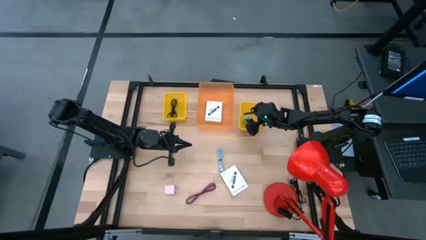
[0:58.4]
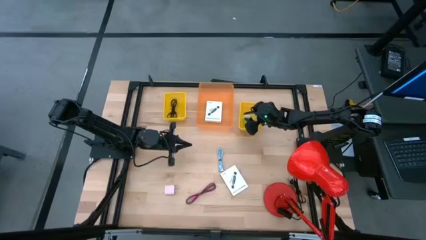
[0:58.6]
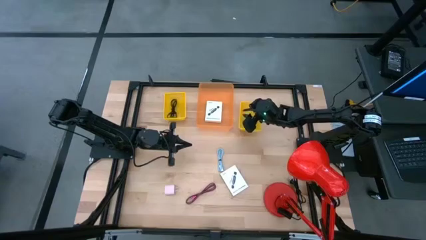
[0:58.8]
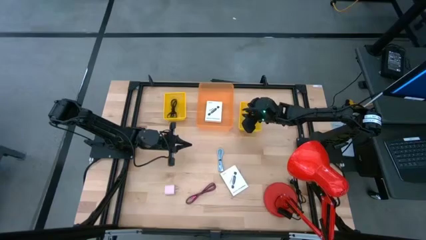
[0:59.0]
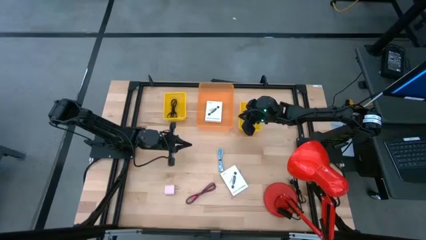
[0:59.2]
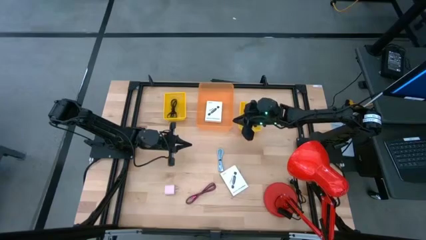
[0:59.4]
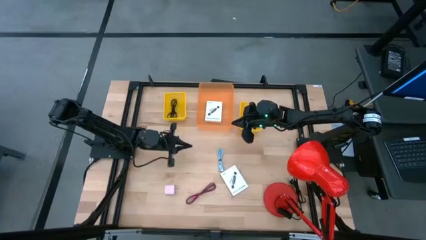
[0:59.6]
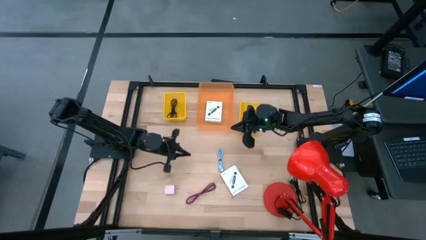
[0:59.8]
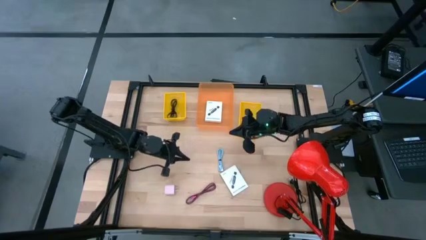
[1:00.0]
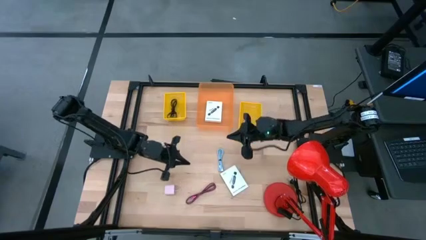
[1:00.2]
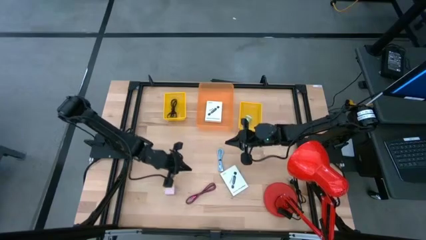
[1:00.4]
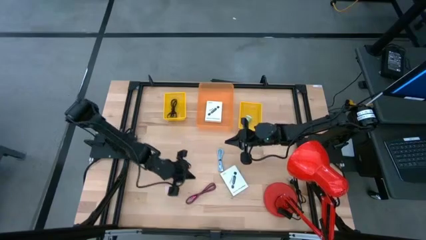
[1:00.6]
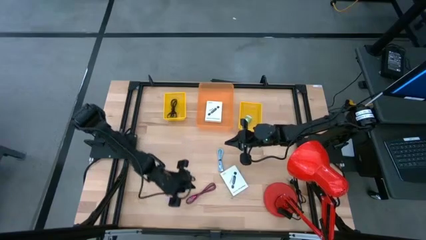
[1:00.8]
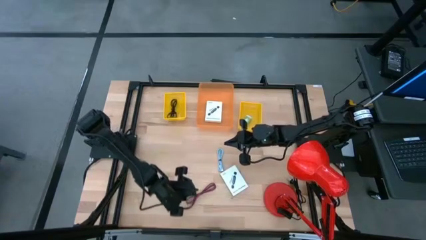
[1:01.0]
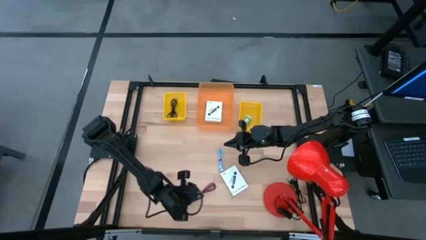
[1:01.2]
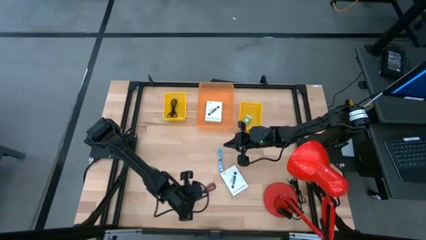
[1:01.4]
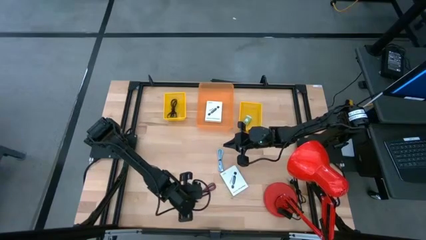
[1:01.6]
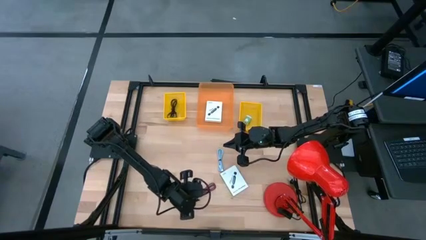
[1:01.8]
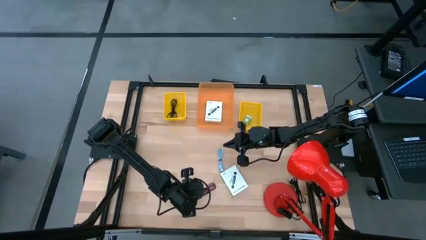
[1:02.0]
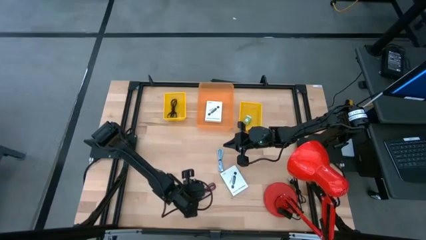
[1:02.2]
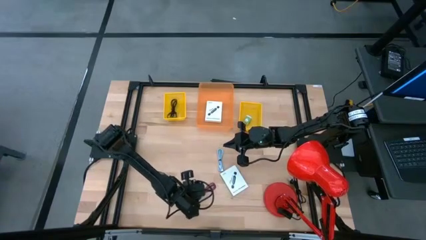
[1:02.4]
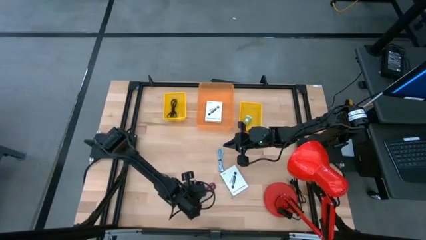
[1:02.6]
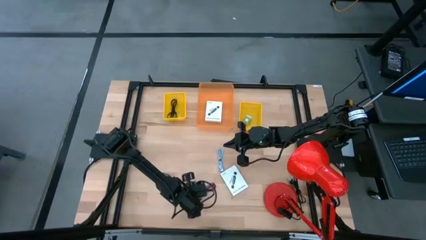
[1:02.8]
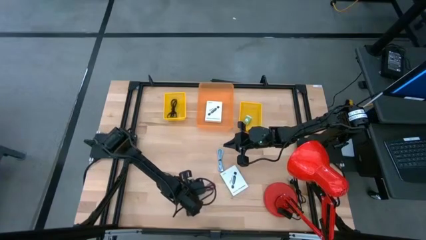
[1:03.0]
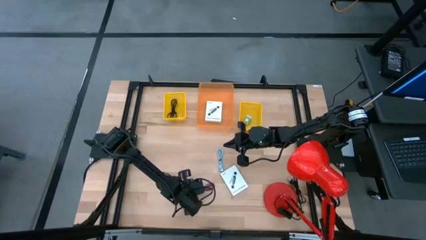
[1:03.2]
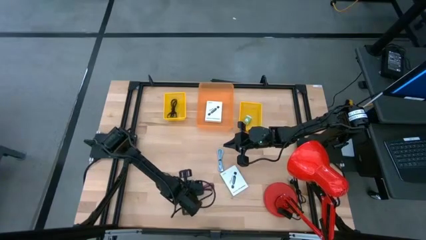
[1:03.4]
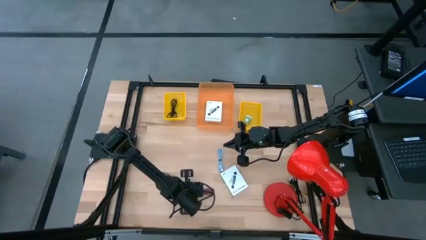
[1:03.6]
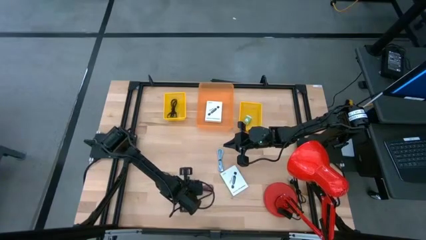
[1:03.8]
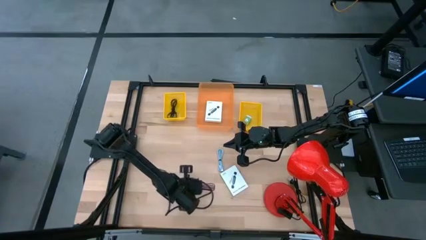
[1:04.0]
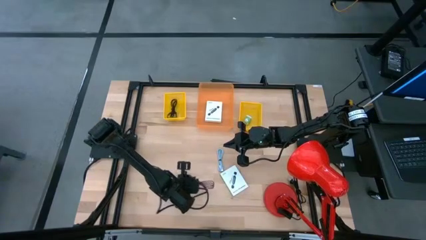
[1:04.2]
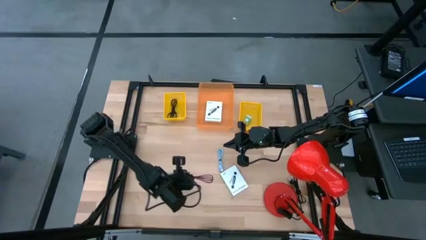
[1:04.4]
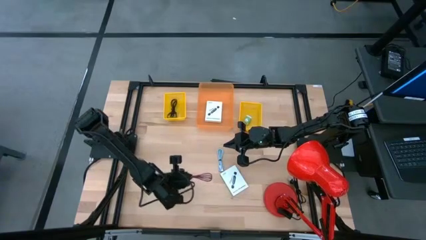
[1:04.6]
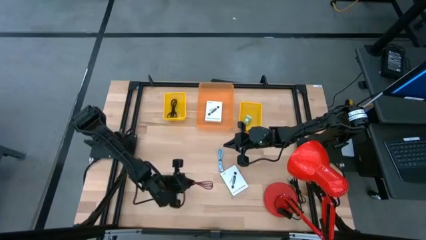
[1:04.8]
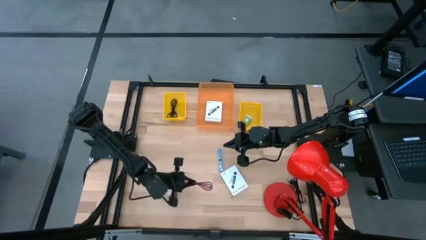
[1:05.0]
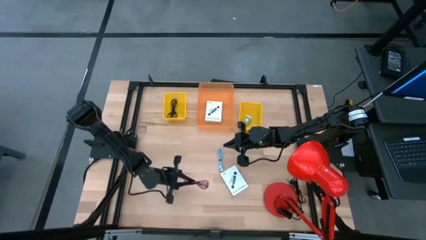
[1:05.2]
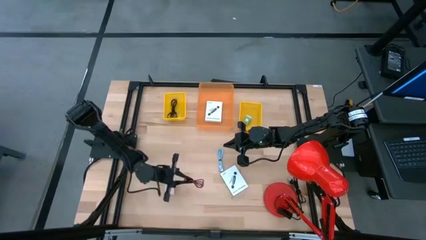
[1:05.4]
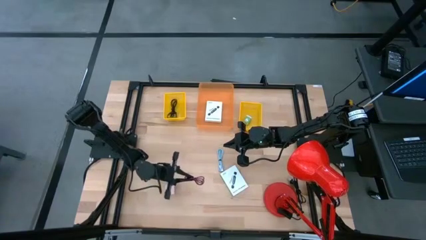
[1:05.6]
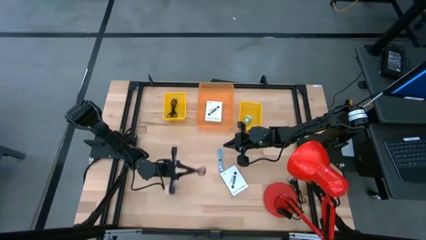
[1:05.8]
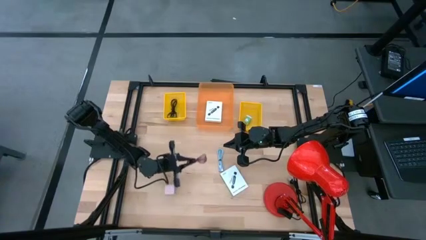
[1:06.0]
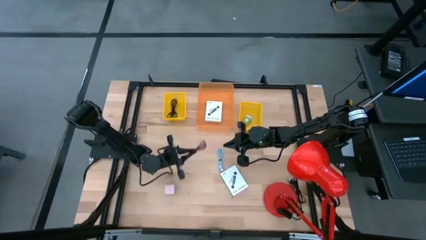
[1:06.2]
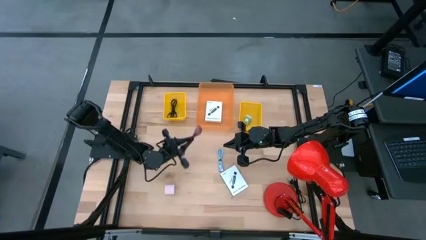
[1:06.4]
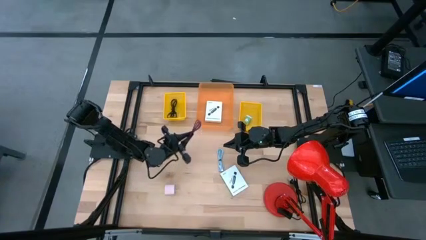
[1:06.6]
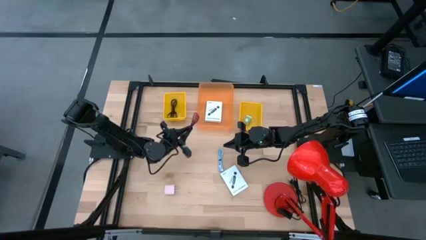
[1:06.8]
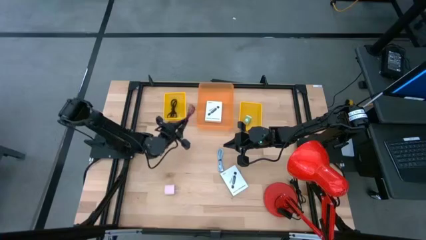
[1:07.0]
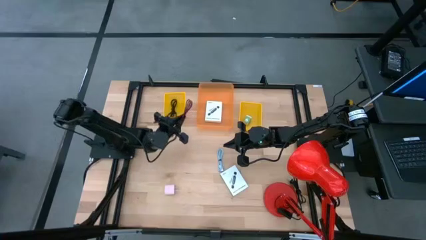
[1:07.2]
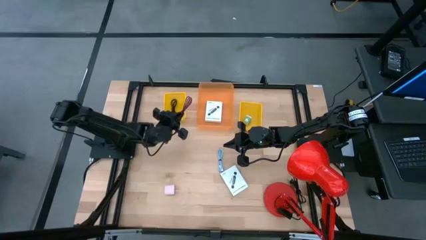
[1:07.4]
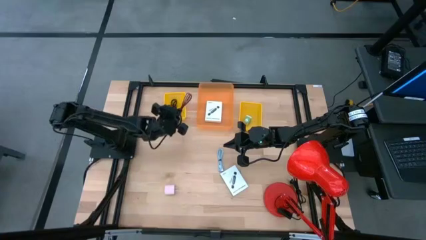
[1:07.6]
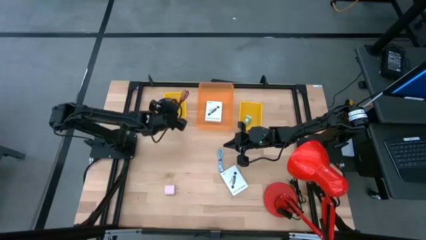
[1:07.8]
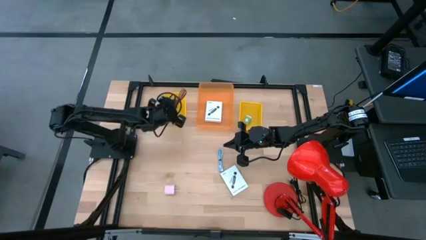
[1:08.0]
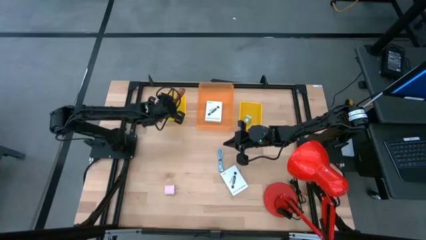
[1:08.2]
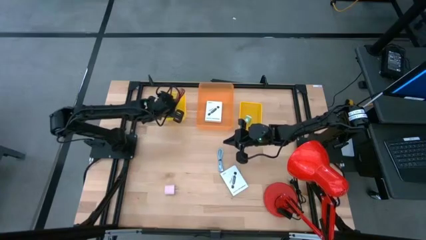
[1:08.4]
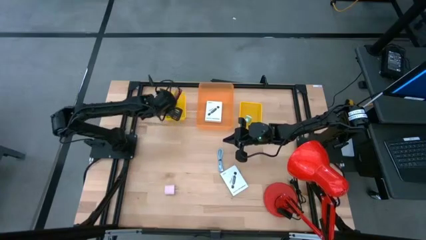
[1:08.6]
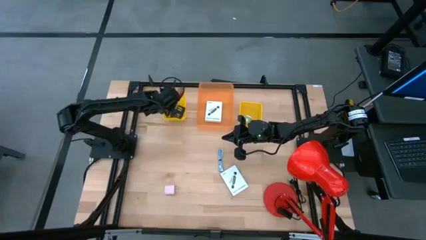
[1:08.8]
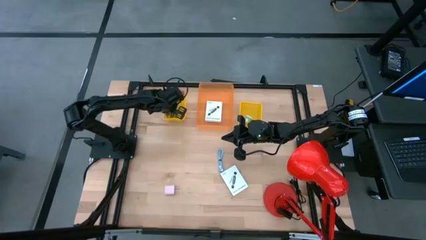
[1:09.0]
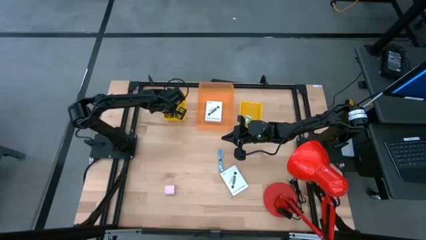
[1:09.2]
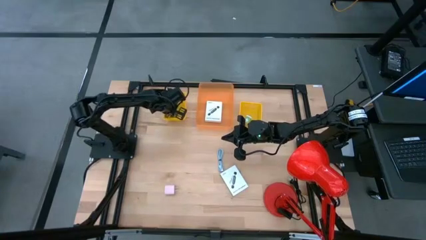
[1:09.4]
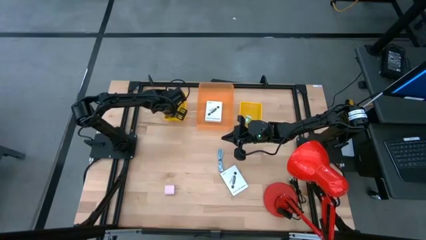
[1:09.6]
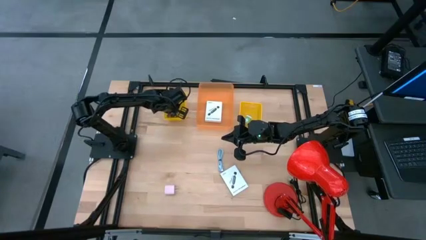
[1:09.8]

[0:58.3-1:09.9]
Task: Pick and place items into bin
Put the pink charger cable into the left yellow bin

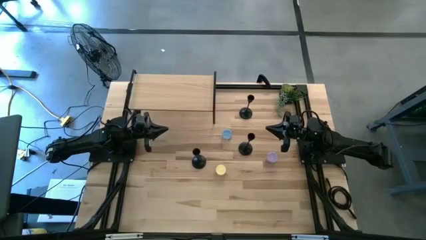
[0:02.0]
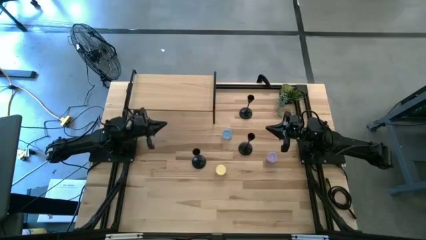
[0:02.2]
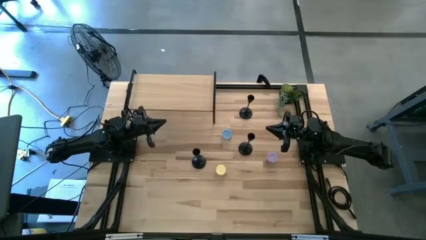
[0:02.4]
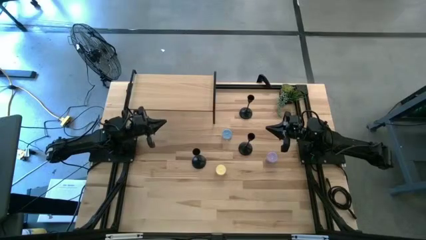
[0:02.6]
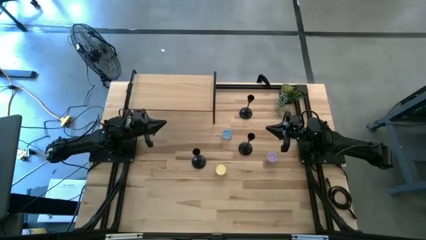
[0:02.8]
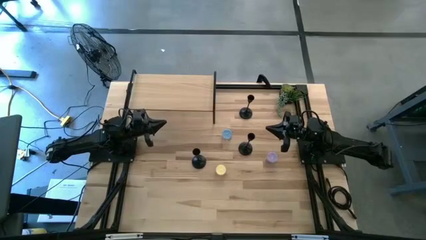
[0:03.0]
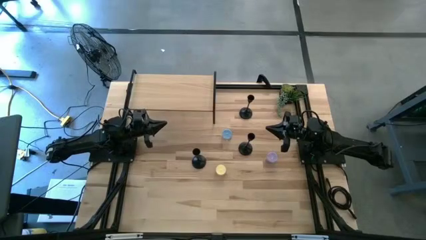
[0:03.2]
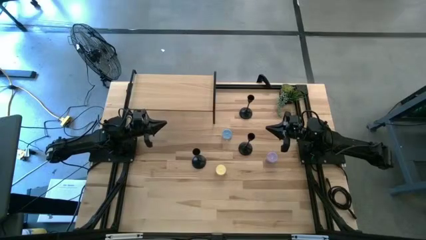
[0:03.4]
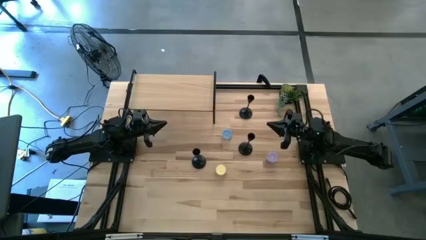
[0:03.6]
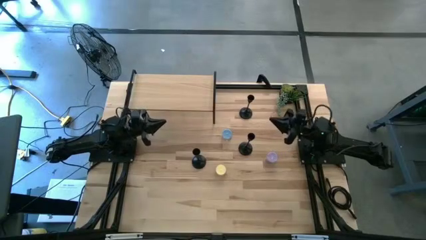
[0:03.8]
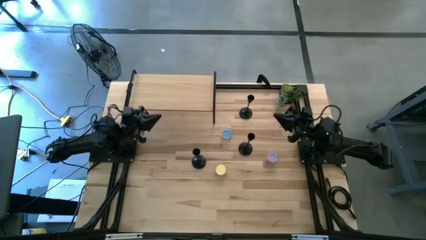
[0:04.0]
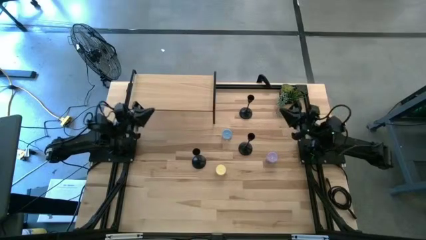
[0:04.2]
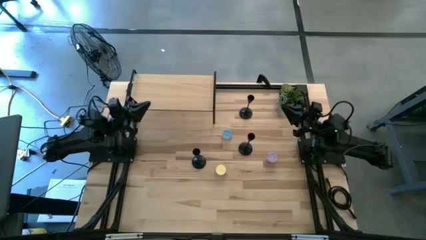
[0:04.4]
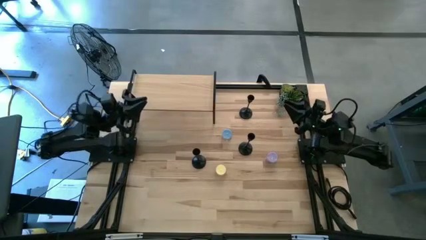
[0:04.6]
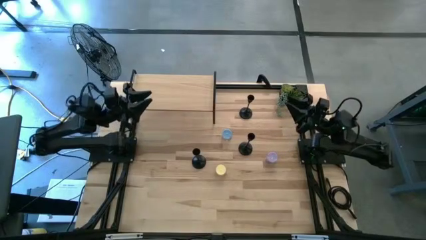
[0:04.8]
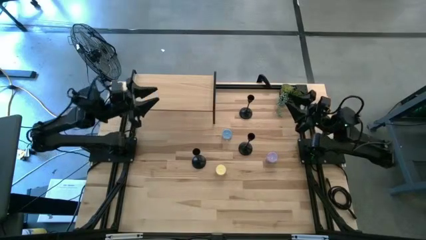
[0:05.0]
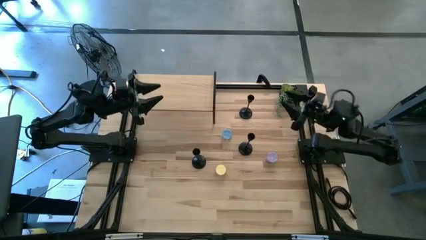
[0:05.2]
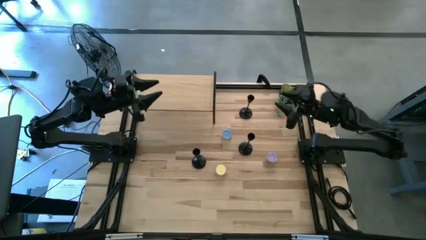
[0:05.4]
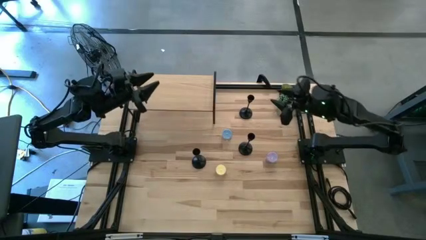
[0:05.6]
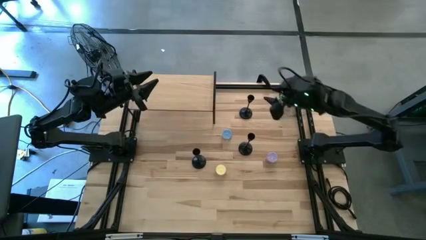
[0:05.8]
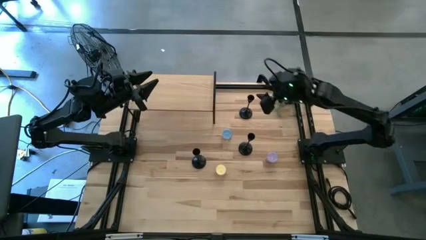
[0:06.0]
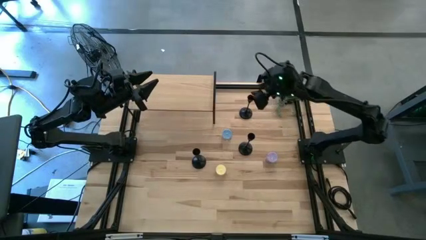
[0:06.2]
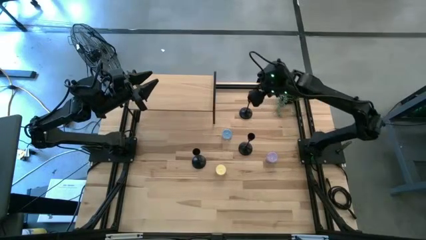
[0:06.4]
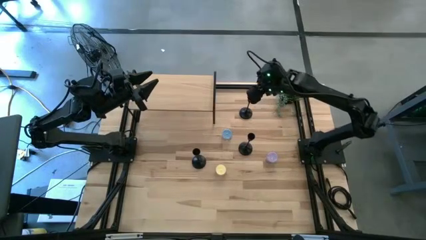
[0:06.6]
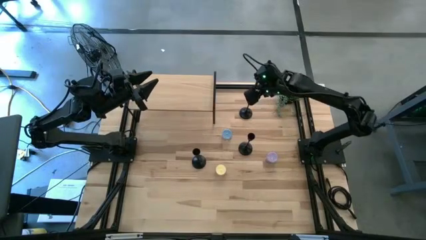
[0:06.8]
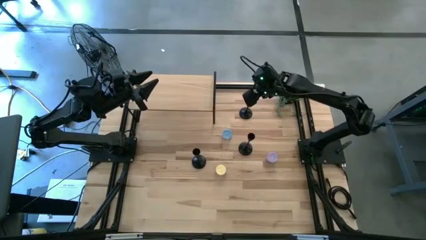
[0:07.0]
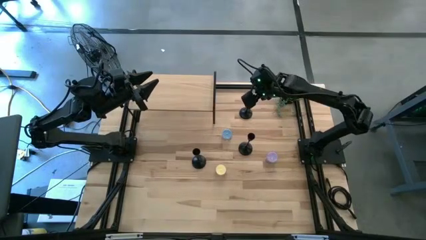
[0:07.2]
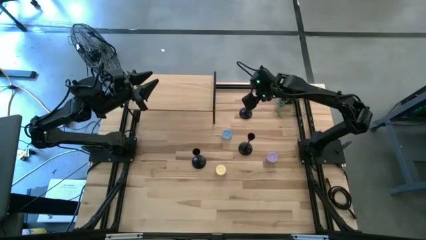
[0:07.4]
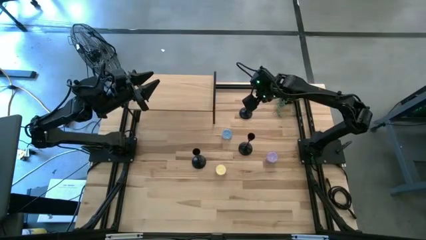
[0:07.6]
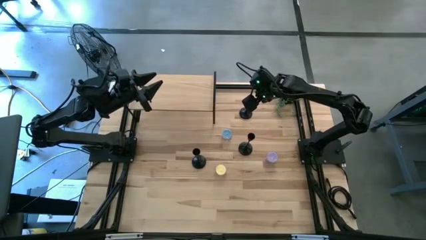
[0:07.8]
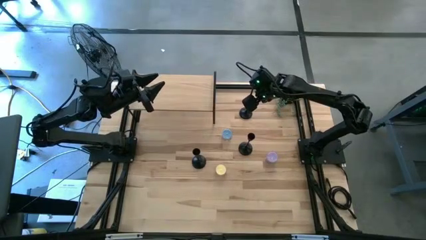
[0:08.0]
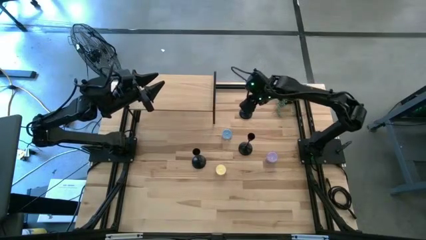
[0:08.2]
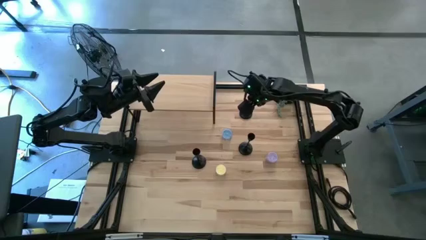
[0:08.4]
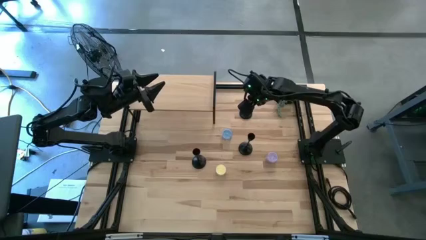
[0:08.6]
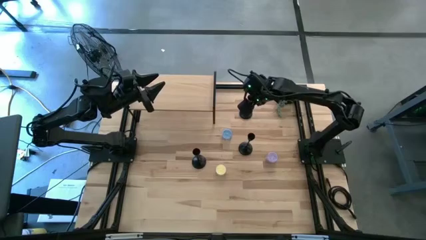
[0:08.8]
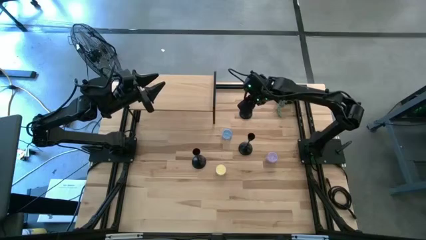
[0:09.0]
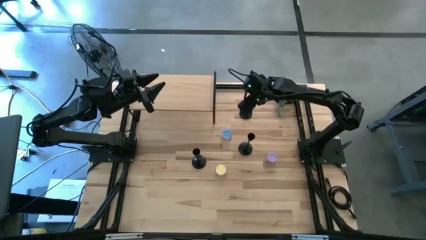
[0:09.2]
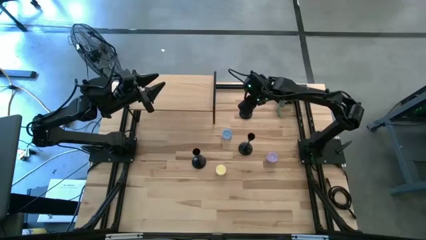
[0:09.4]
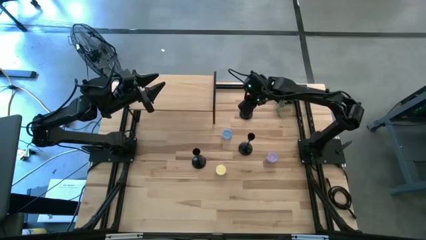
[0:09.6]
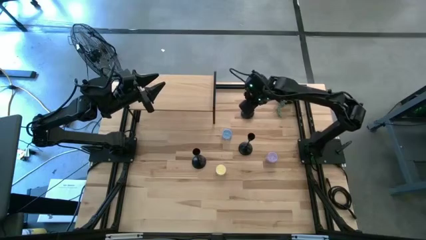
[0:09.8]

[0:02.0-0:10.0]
Task: Pick & Place candle stick holders
Put the top black candle holder on the shelf
